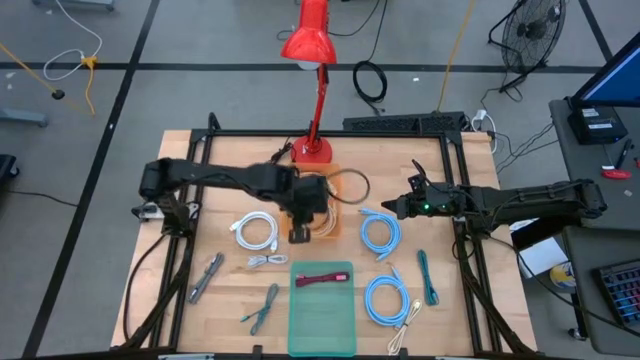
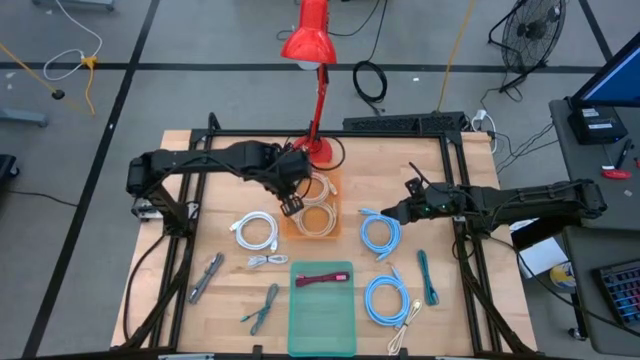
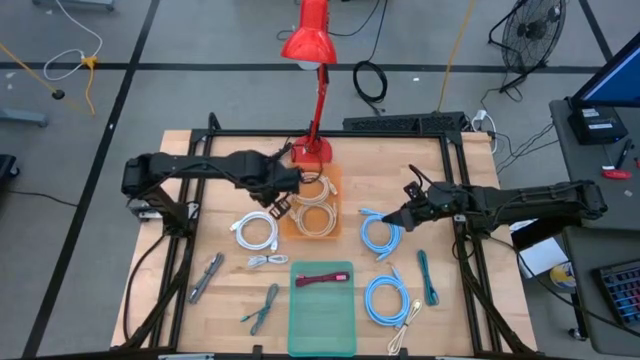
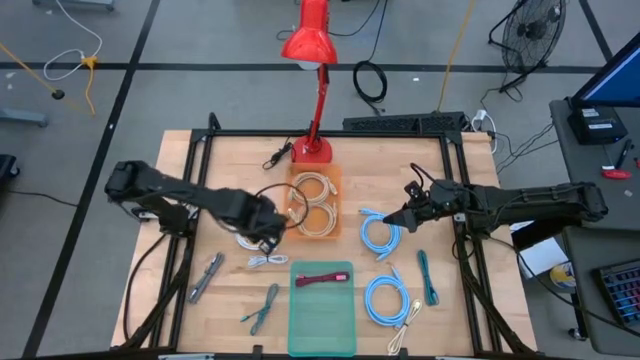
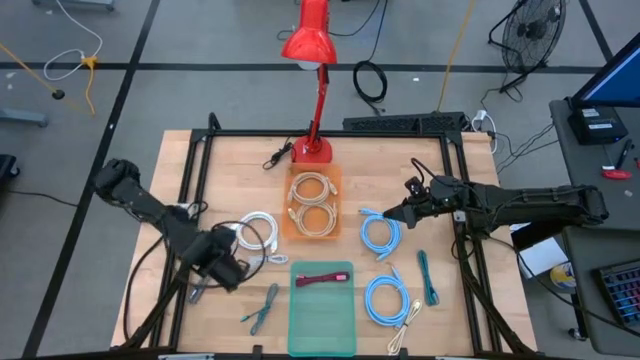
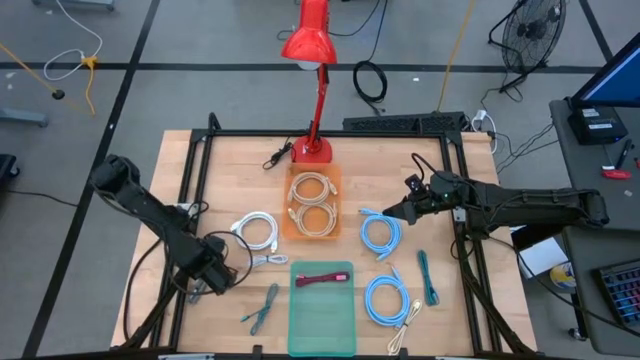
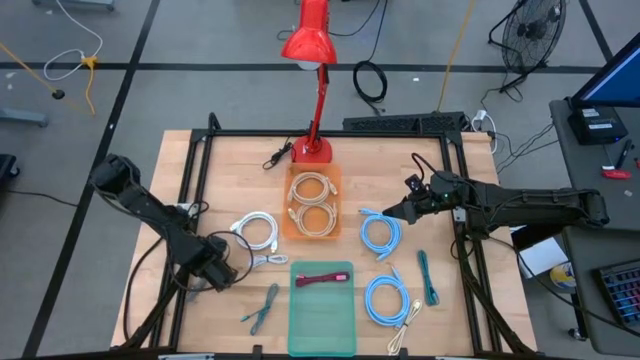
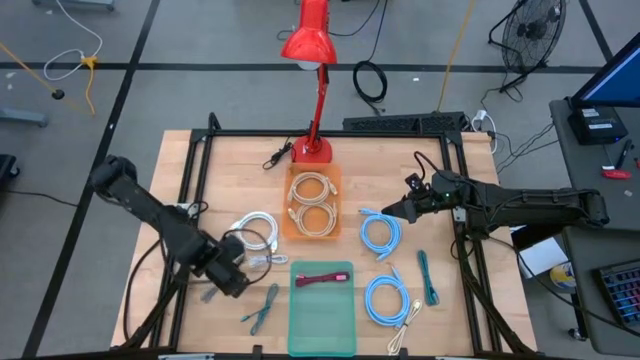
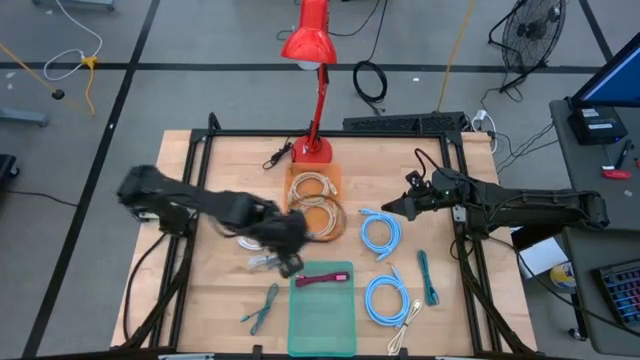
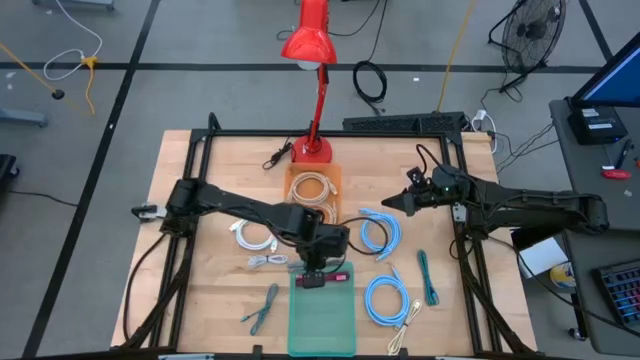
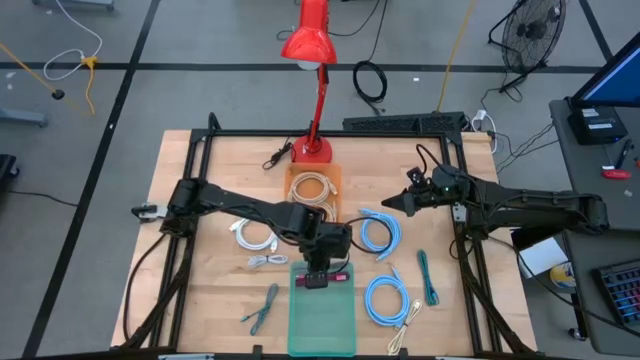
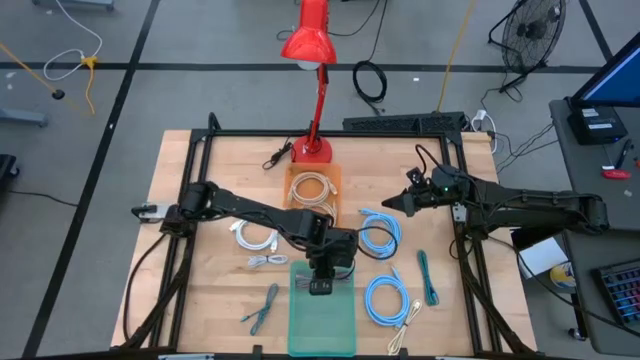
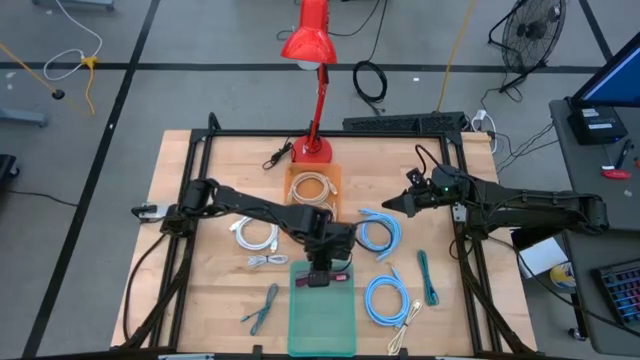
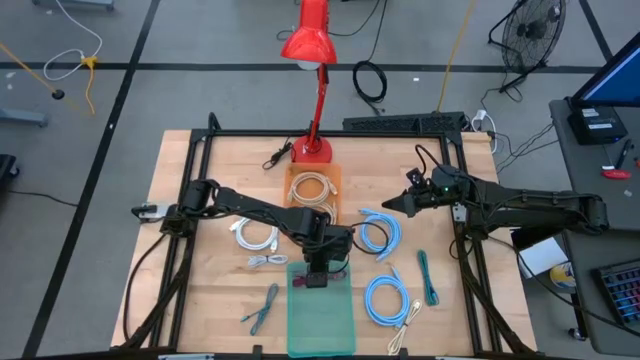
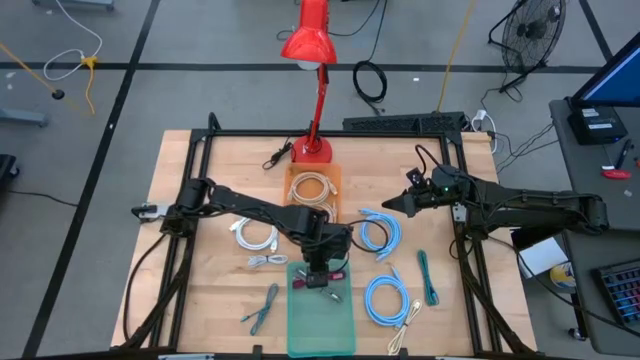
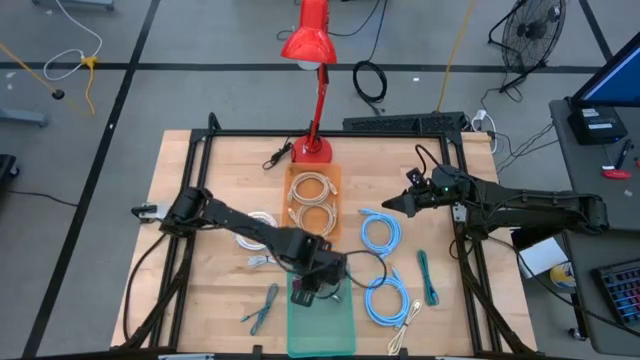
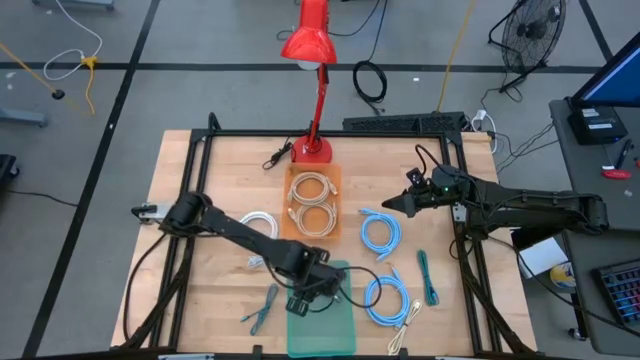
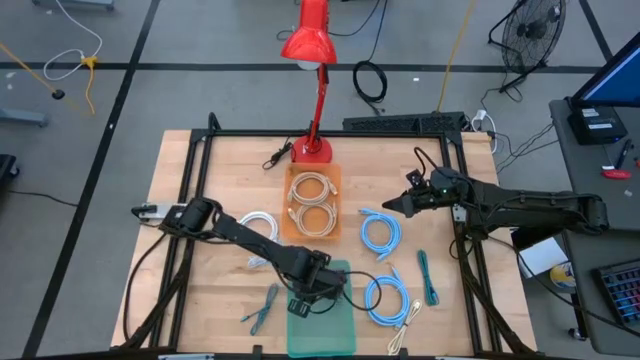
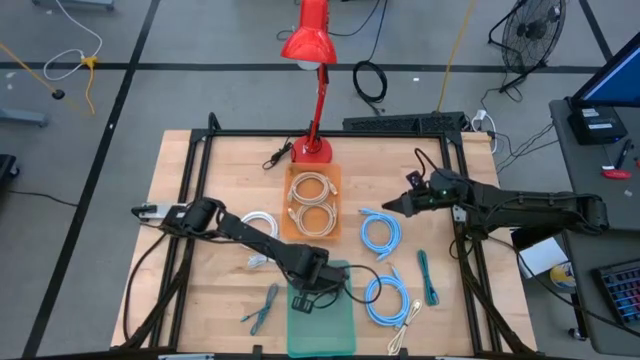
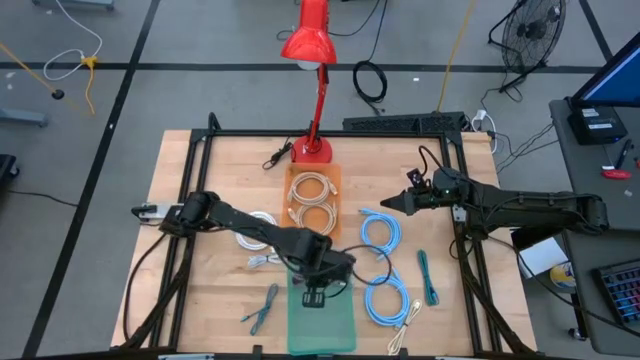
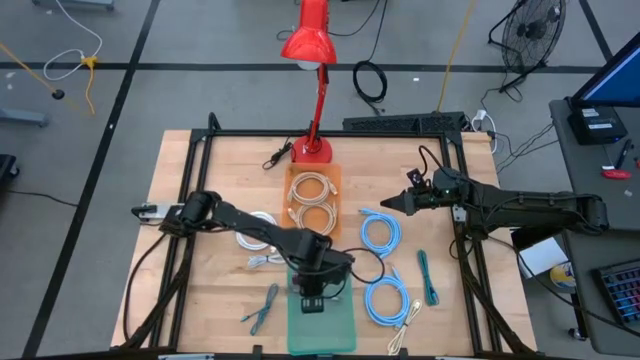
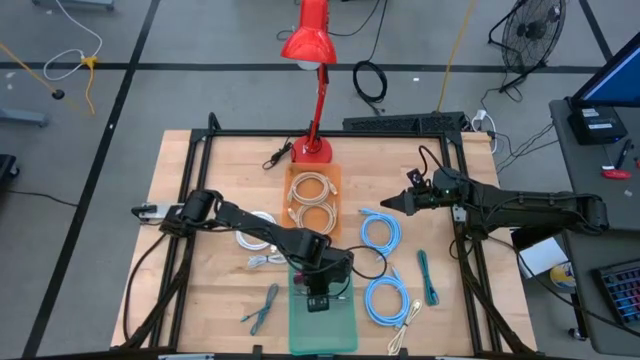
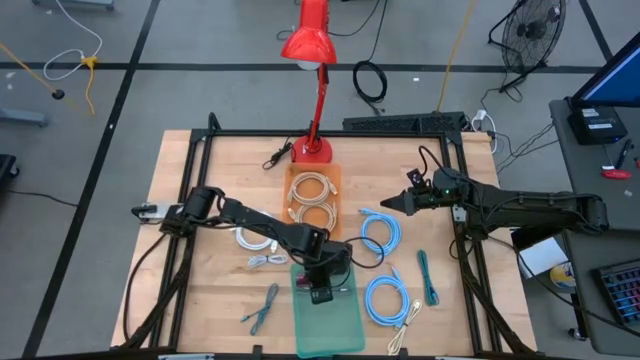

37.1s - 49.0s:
Task: Sort cables
Put the gray charger cable into the blue bin

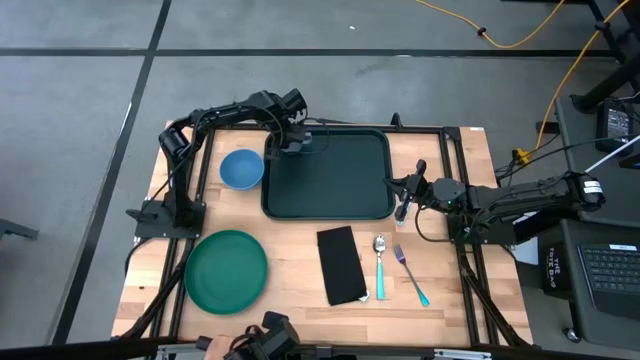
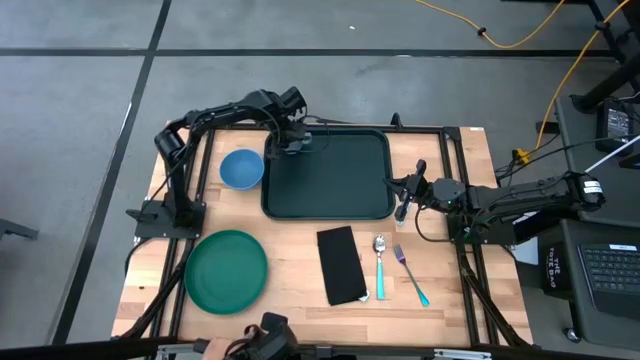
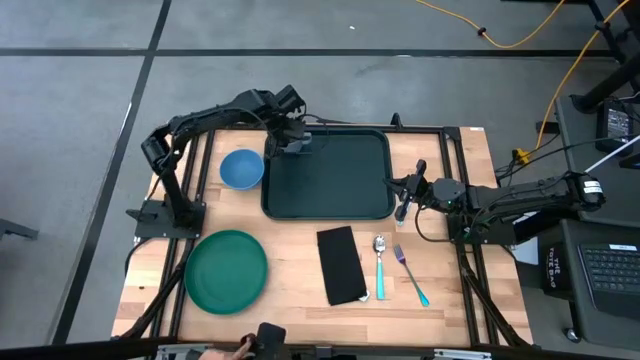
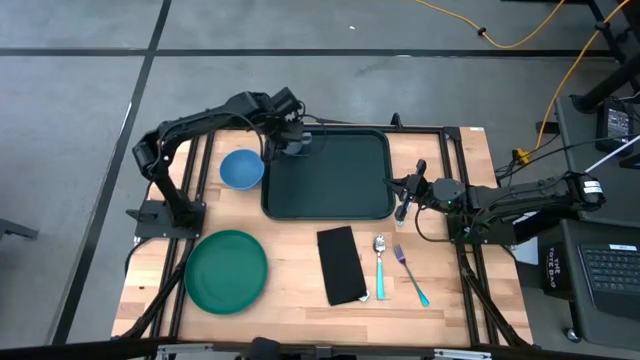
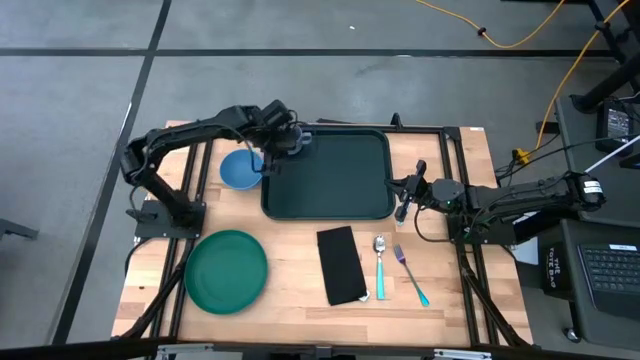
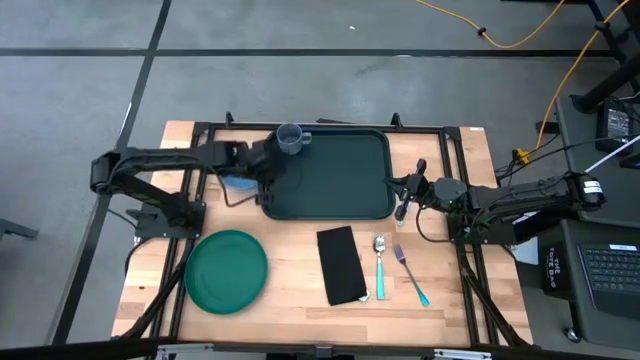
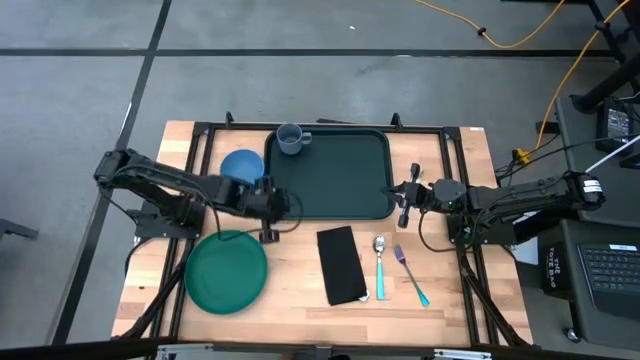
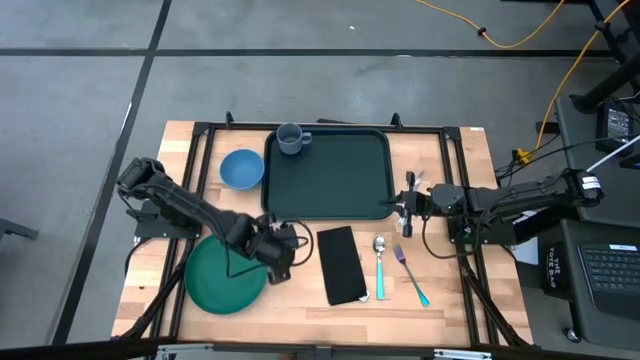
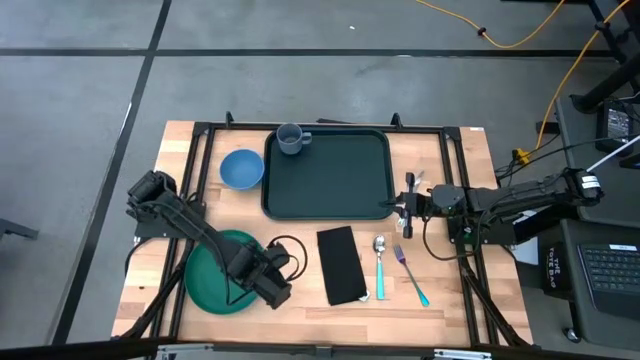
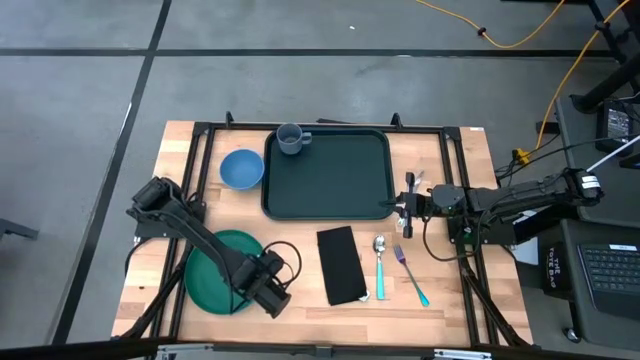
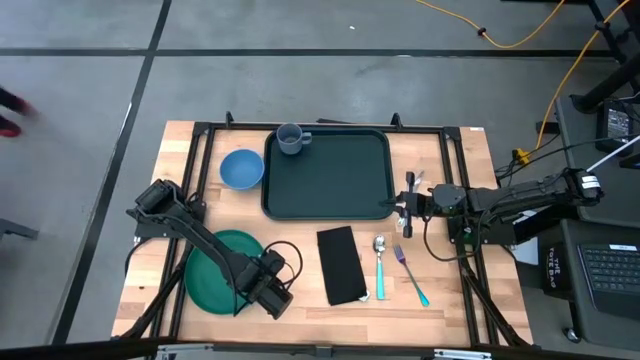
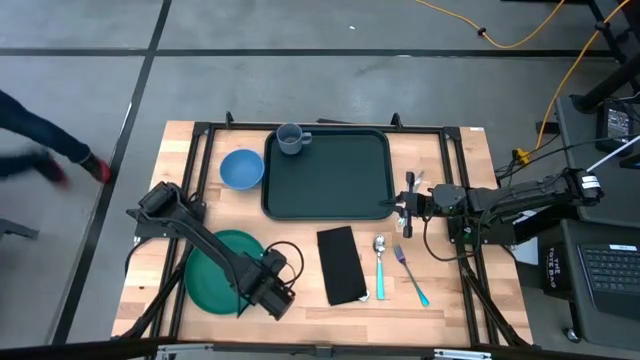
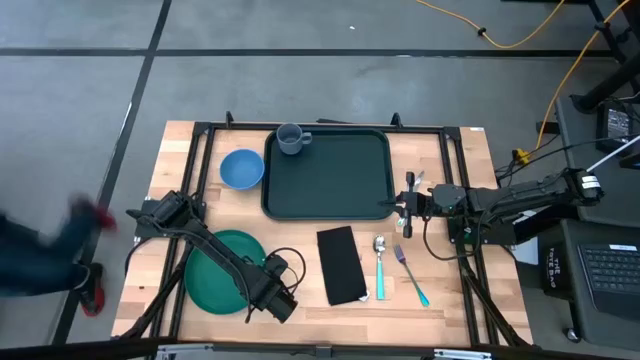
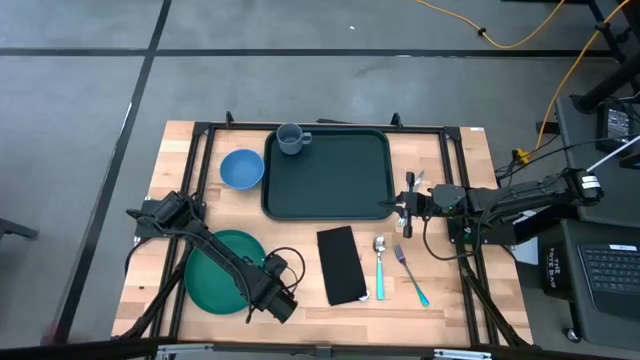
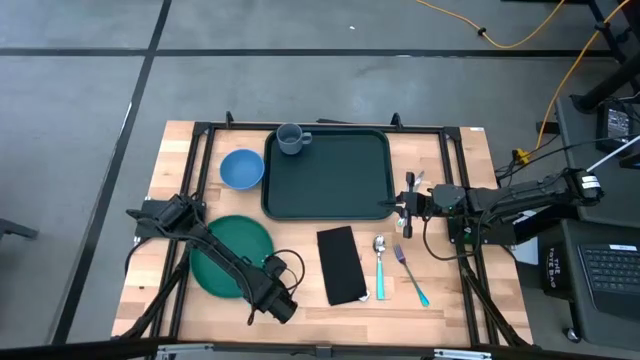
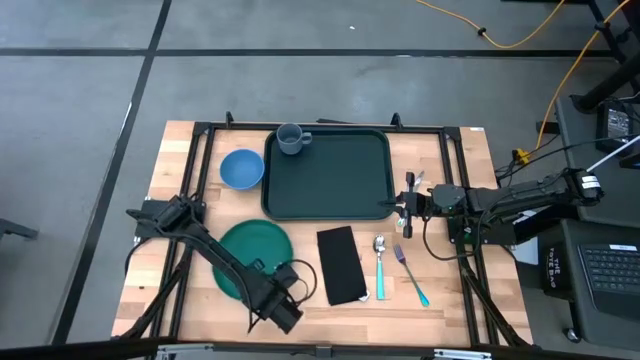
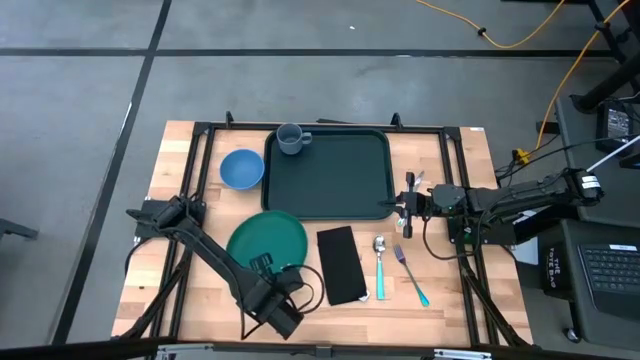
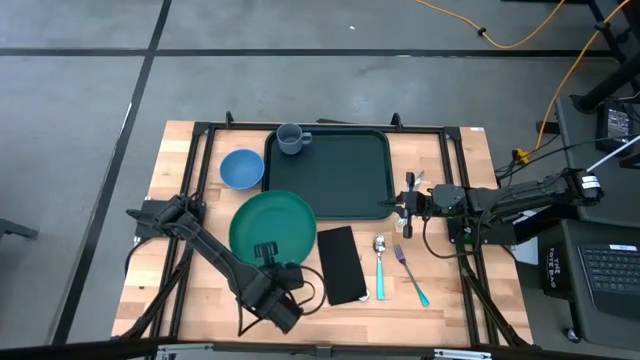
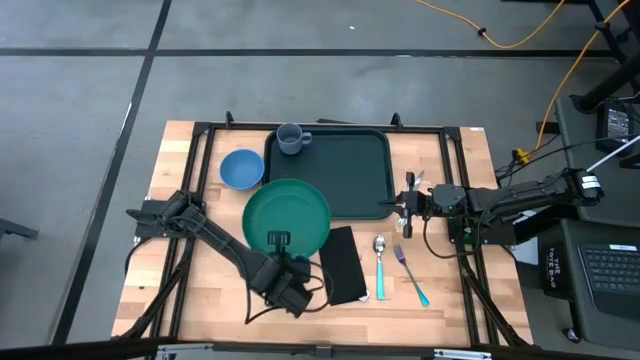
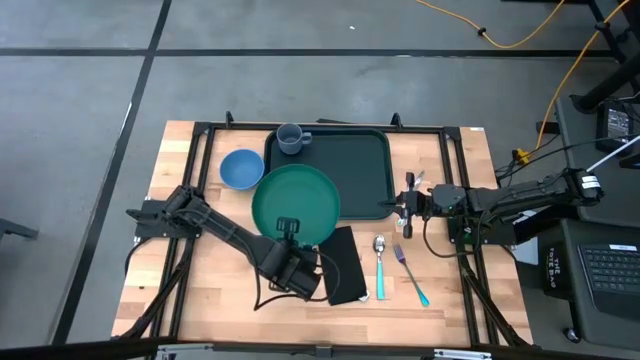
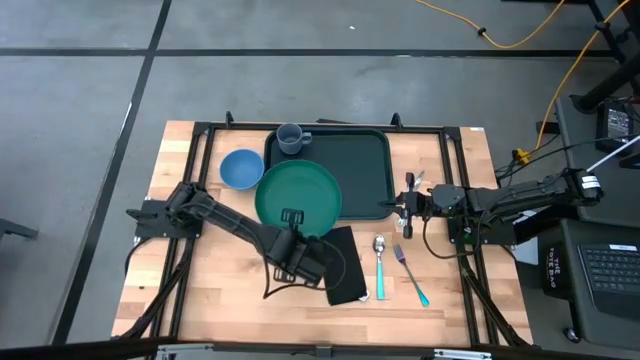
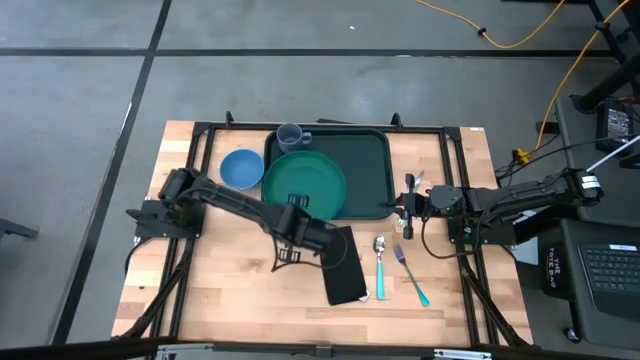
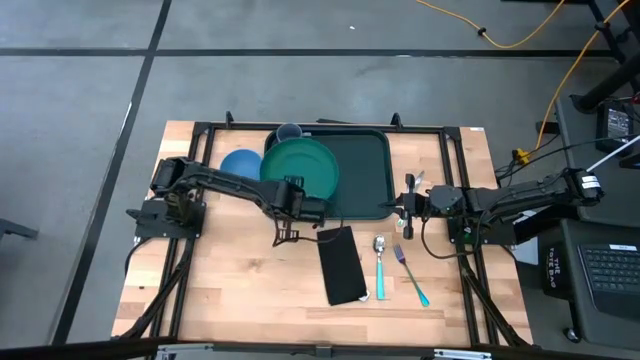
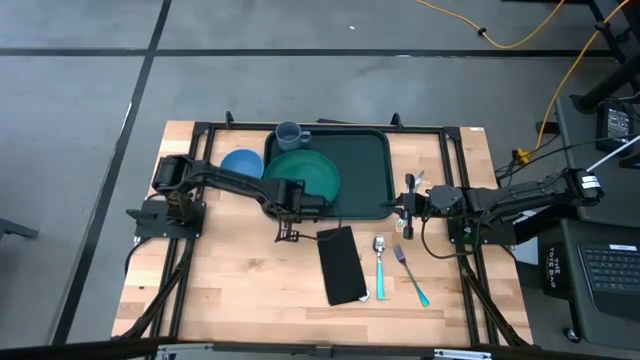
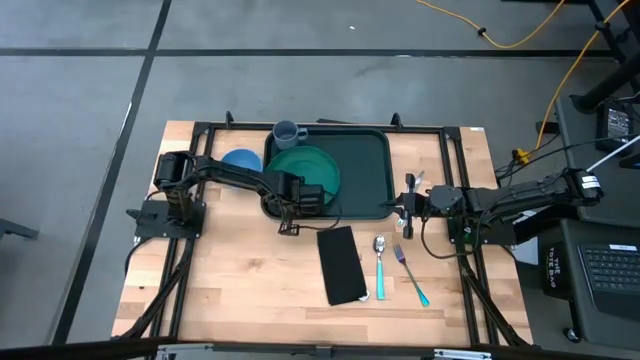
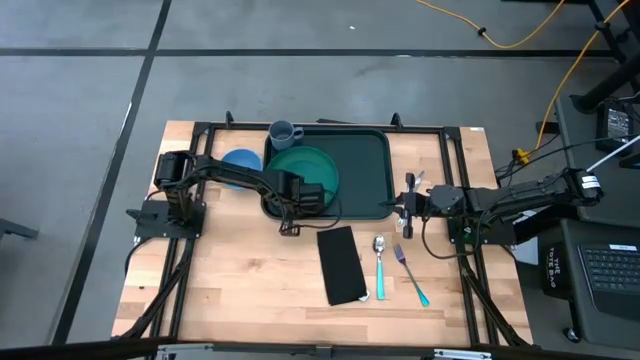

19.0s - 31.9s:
Task: Set up tray
Put the green plate on the green serving tray below the blue mug
